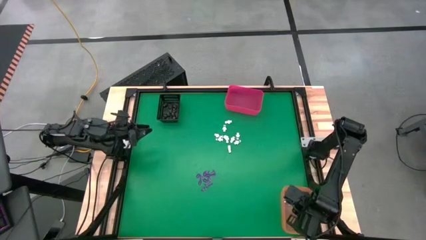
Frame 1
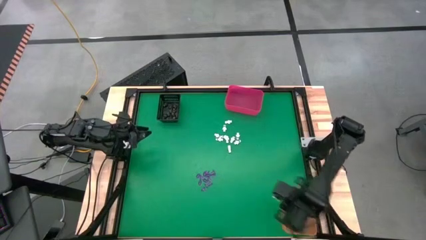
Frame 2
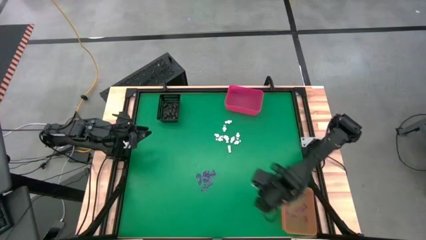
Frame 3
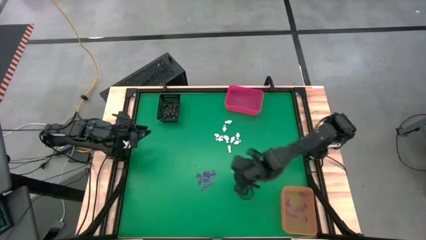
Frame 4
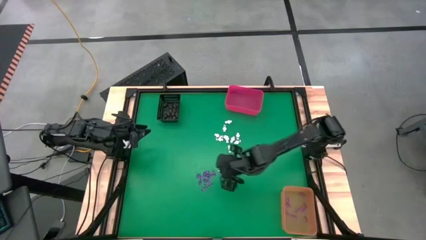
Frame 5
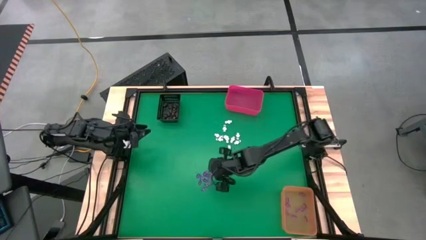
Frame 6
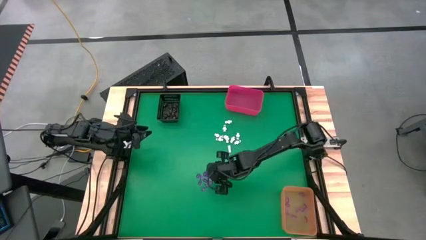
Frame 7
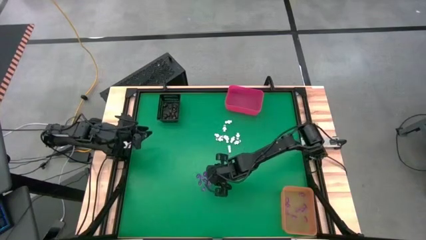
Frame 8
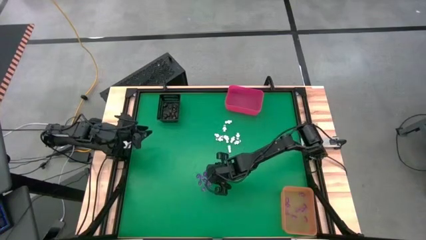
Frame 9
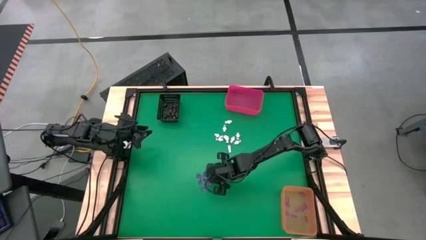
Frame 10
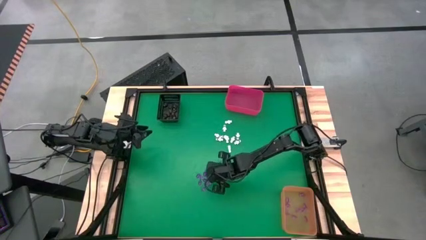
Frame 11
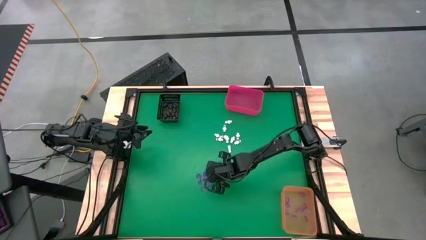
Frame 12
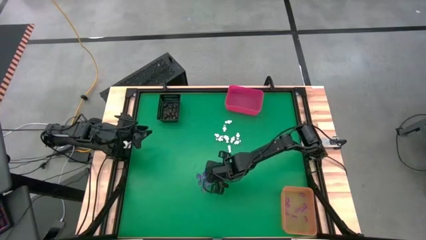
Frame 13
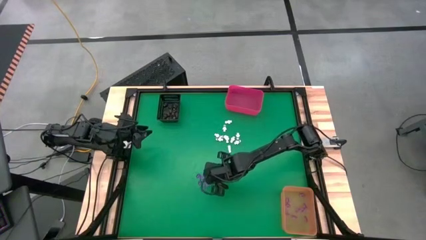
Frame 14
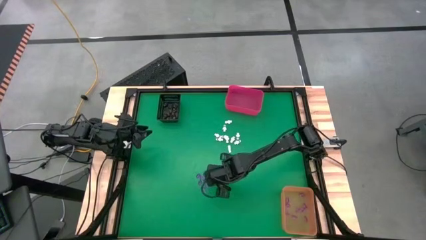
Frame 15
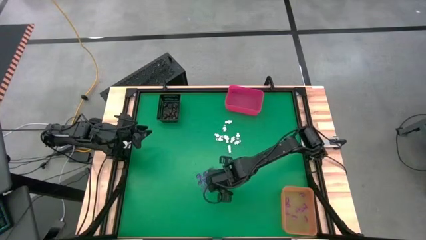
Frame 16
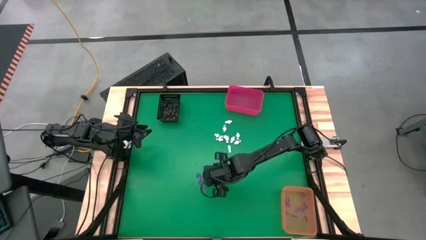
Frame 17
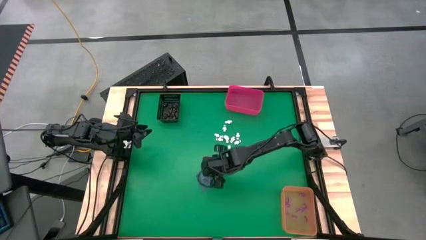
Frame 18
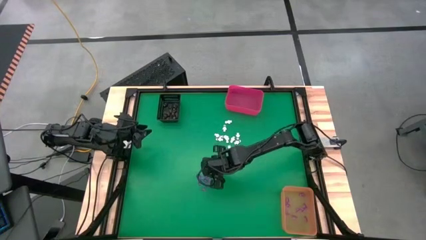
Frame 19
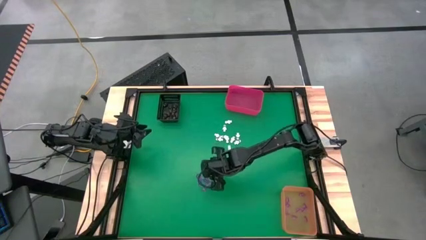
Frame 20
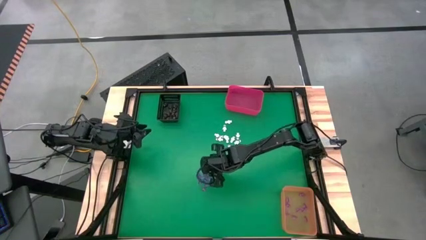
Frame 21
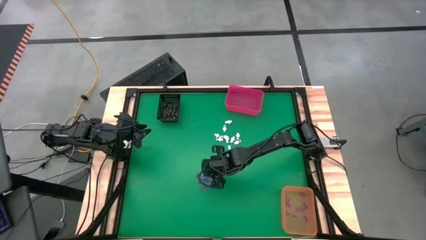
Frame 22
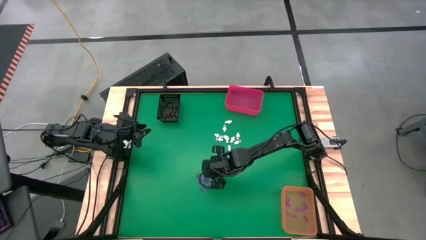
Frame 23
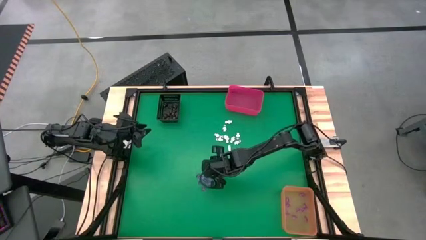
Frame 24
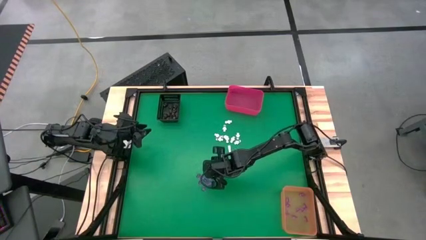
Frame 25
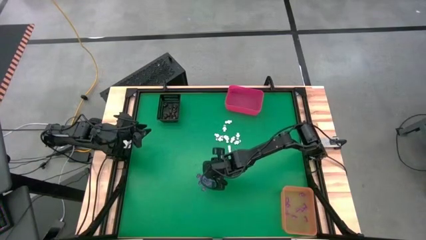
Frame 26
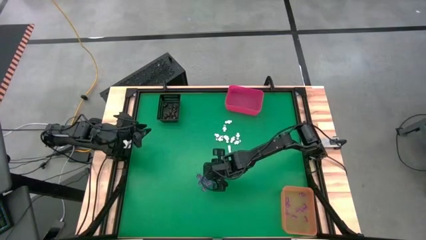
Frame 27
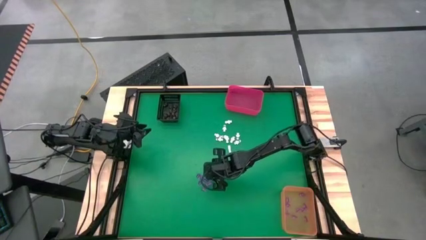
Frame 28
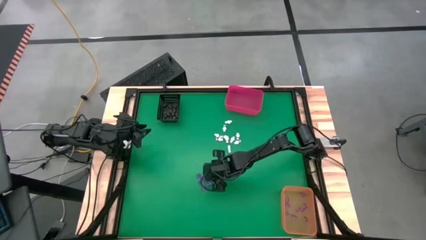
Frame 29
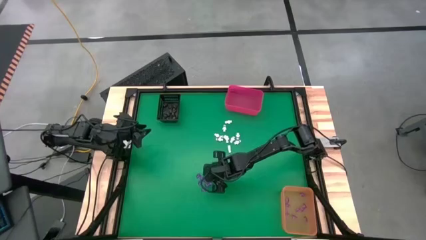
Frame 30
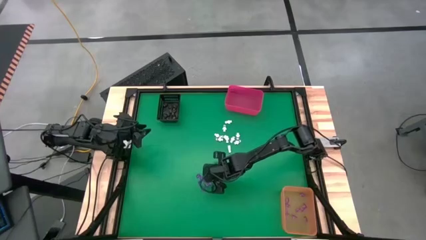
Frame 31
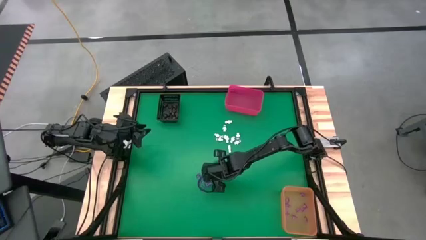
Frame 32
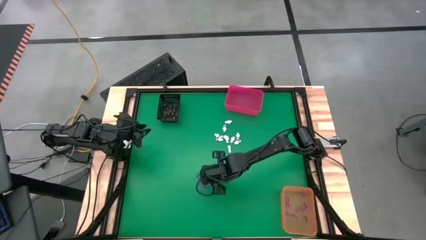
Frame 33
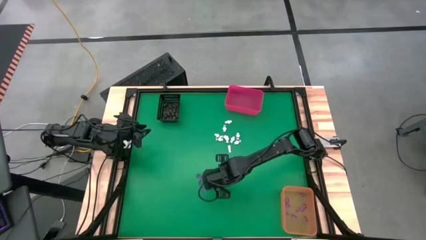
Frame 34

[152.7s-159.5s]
Task: Sort Halloween decoration
Put the pink witch hat toy into the orange bin

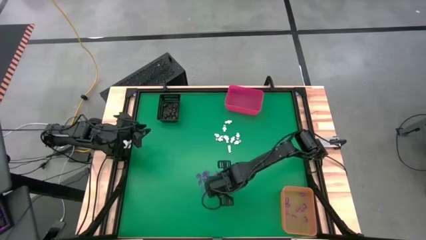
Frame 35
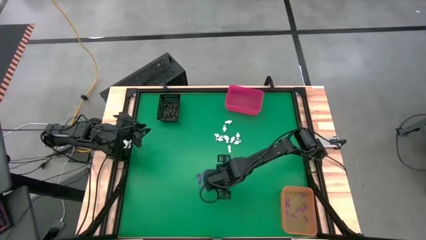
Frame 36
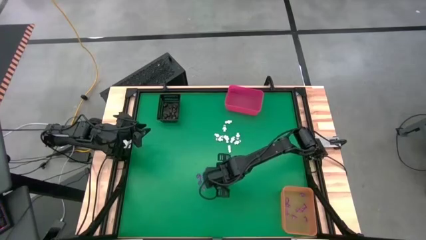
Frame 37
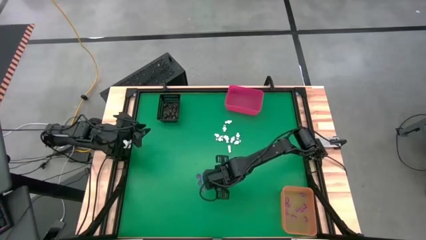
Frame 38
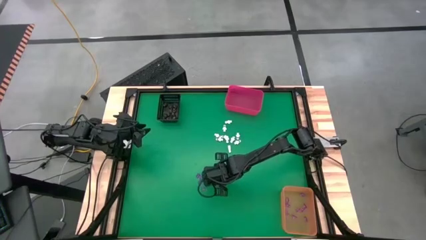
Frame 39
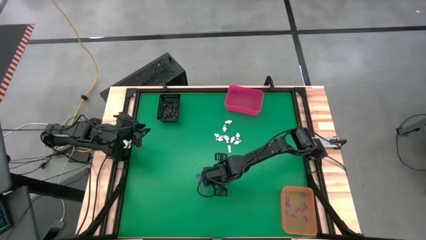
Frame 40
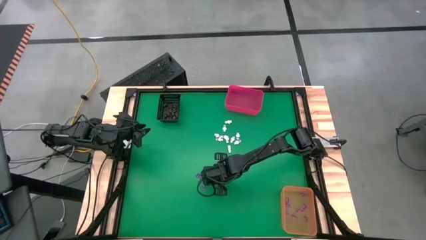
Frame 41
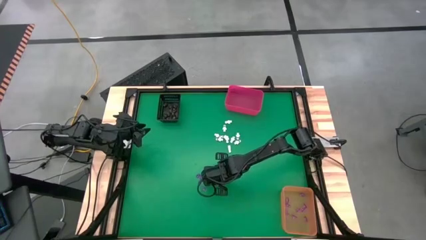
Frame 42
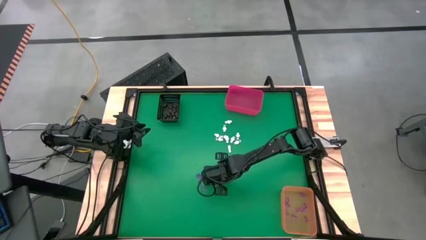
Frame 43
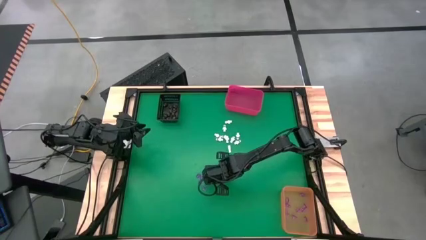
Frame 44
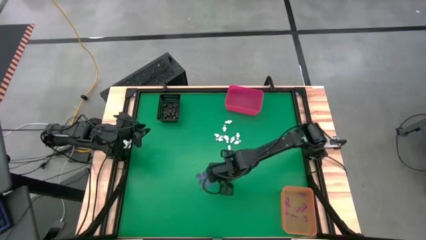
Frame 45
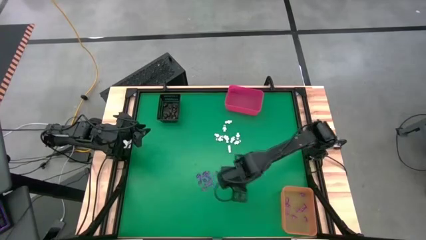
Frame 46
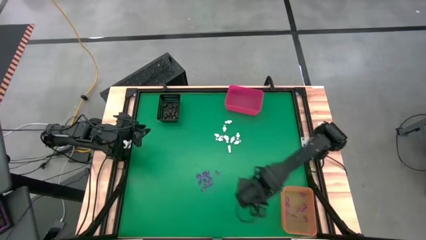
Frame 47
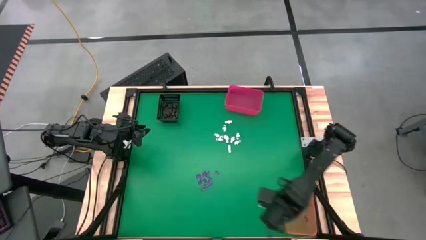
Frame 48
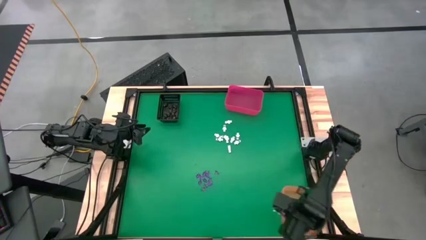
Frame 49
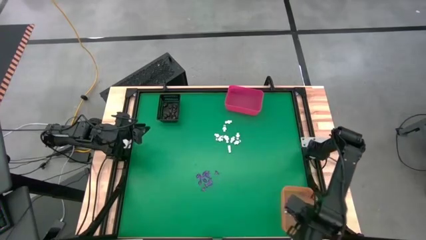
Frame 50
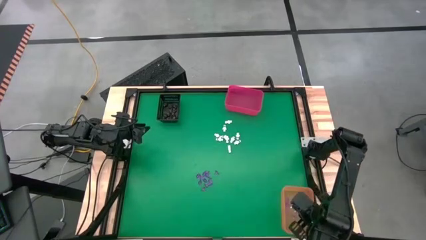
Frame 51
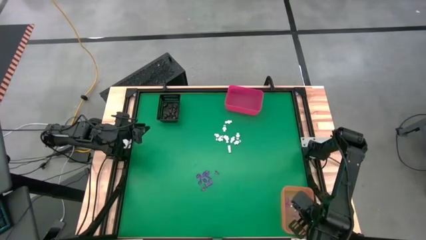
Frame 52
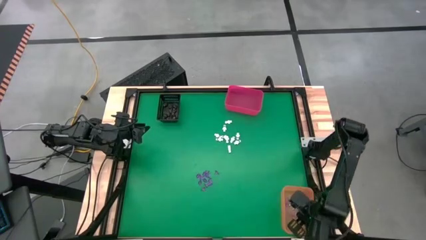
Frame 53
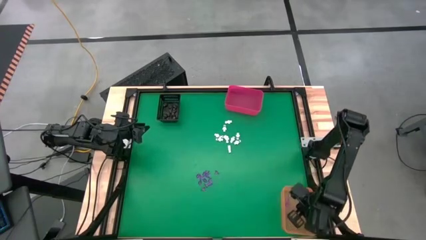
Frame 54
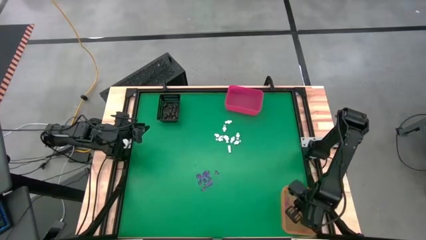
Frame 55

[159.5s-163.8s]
Put the pink witch hat toy into the orange bin

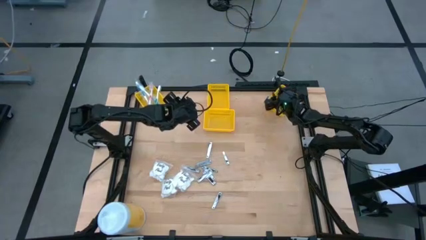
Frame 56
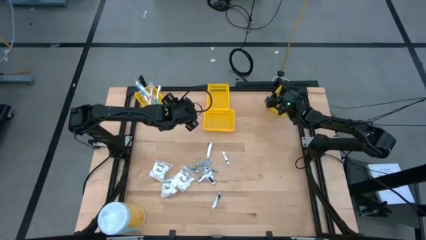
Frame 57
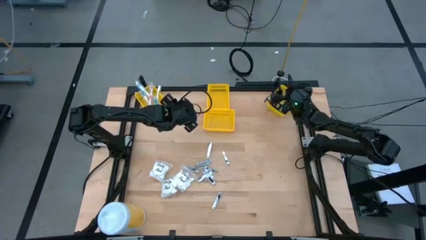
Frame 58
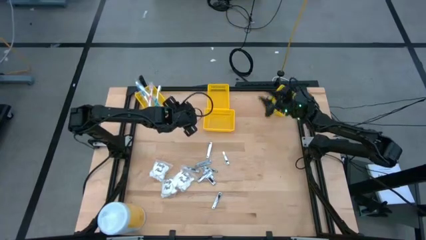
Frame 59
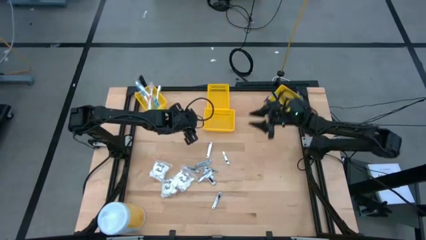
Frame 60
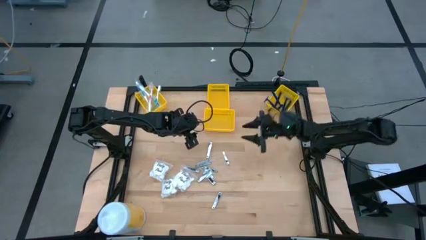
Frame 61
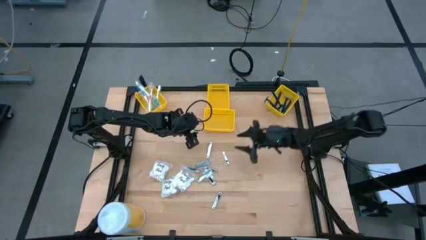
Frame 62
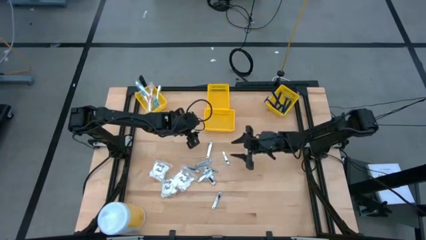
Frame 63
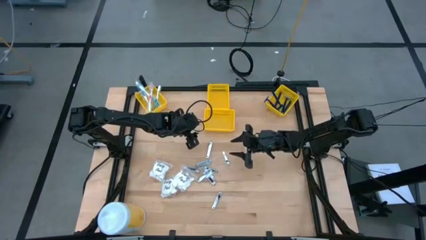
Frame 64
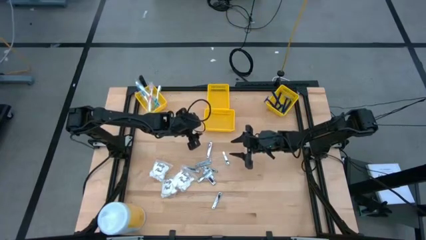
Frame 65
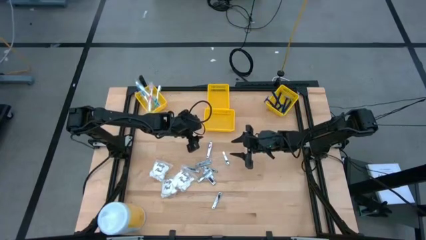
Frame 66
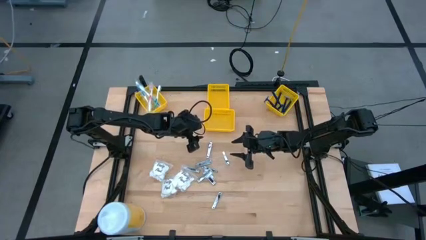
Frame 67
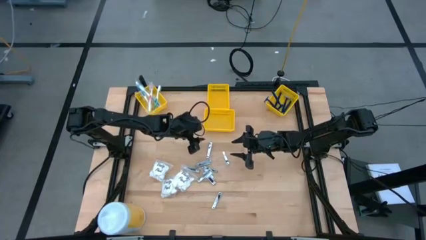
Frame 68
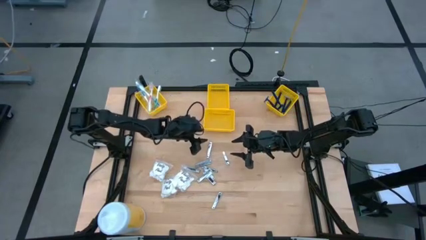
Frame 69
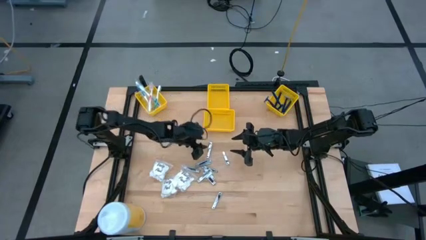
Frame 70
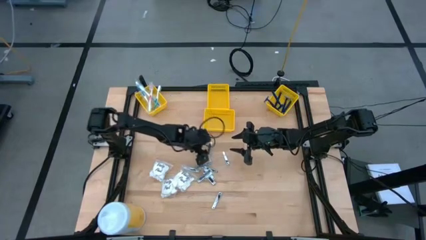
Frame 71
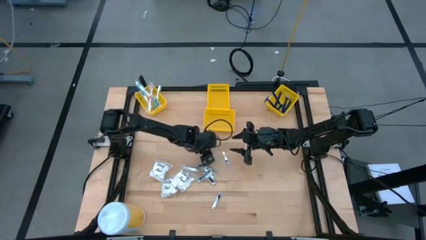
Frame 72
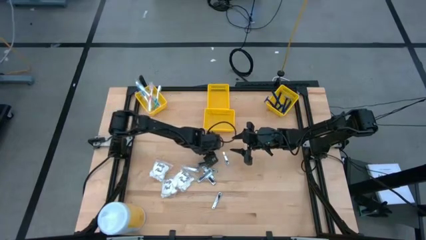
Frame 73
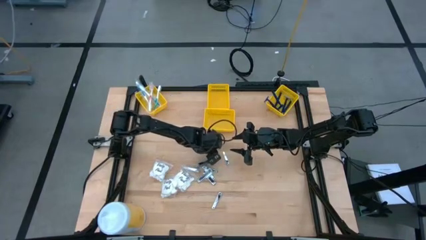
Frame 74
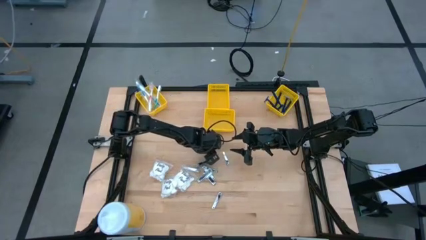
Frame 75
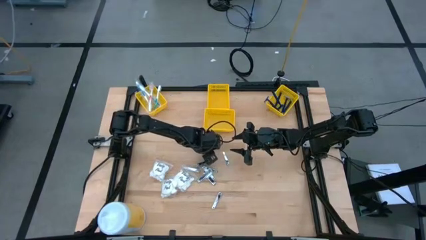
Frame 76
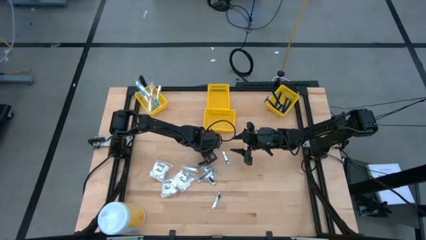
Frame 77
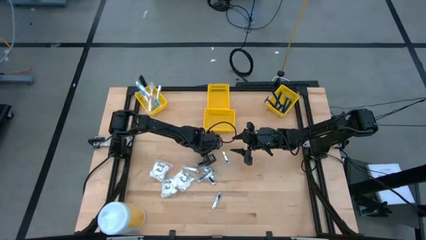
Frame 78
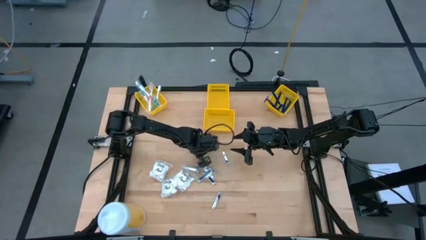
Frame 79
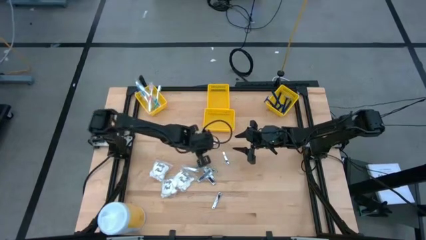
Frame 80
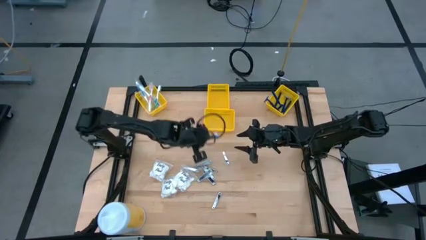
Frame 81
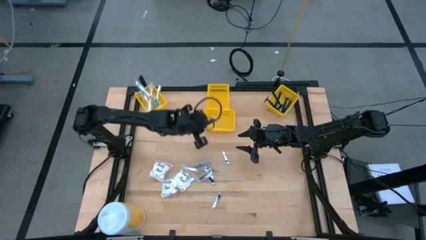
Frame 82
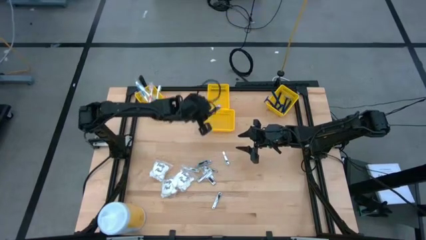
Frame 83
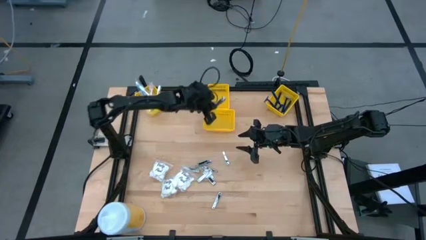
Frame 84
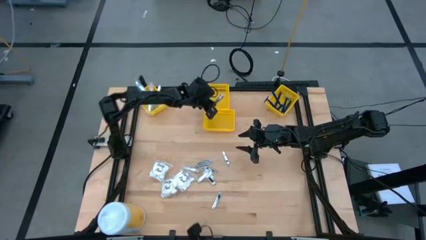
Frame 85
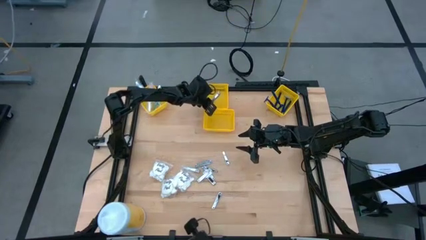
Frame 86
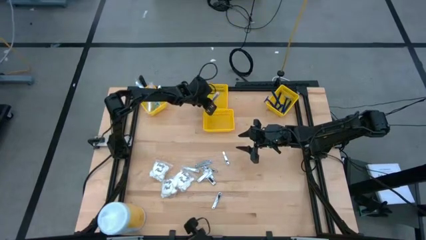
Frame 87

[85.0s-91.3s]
Task: Pick & Place Travel size toiletries
Put the nail cutter into the top middle yellow bin
